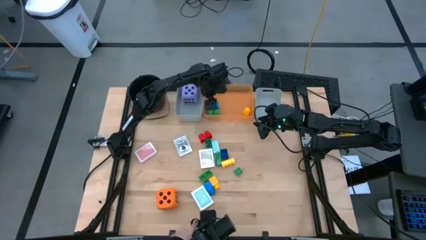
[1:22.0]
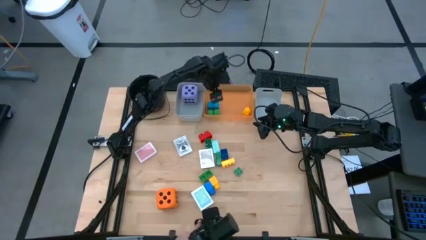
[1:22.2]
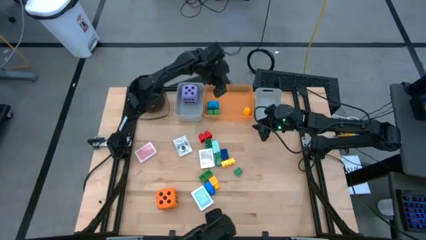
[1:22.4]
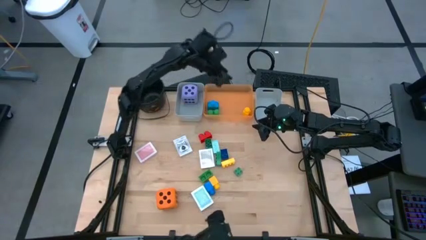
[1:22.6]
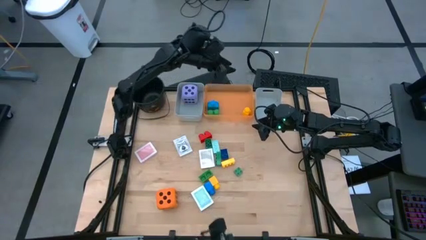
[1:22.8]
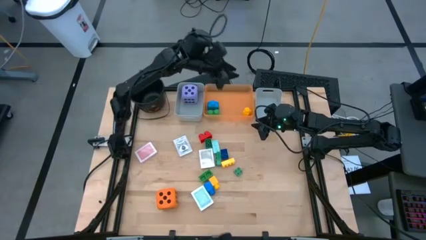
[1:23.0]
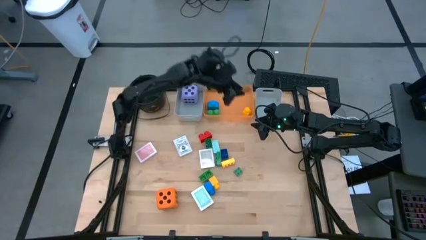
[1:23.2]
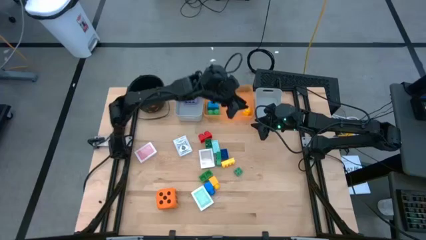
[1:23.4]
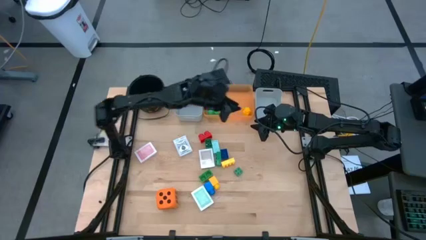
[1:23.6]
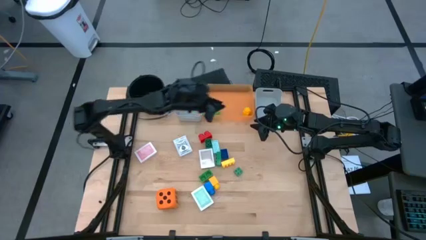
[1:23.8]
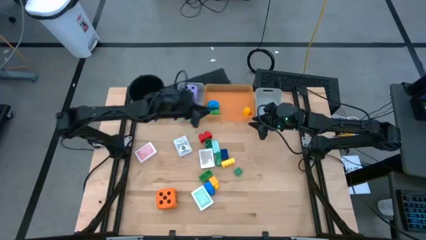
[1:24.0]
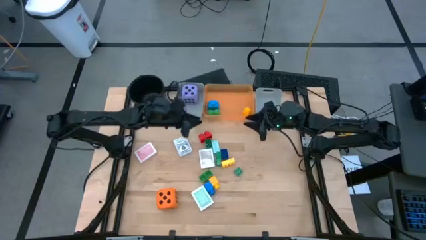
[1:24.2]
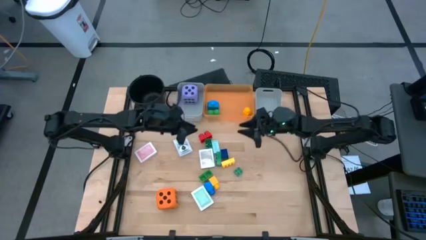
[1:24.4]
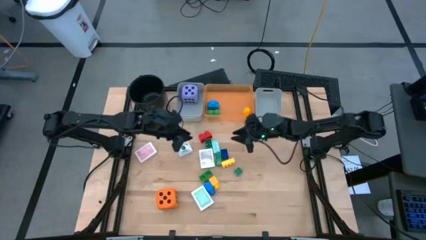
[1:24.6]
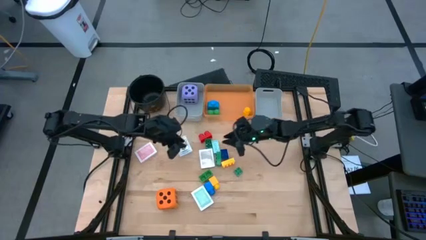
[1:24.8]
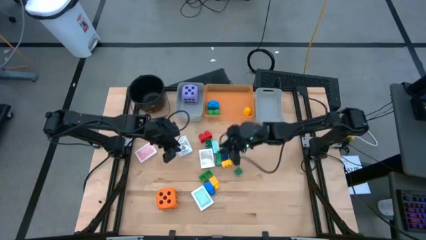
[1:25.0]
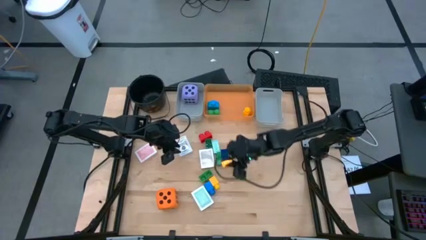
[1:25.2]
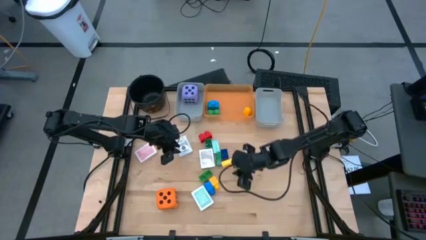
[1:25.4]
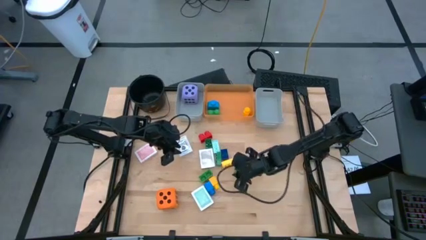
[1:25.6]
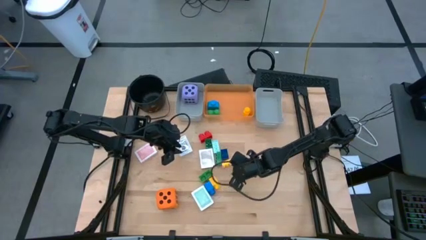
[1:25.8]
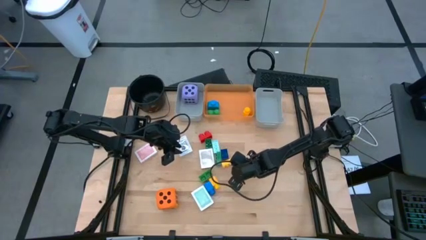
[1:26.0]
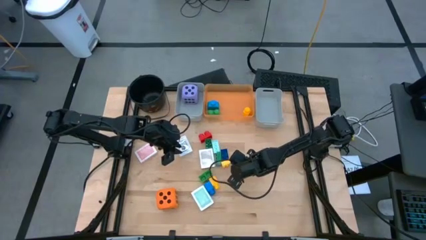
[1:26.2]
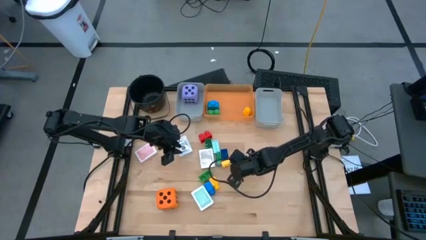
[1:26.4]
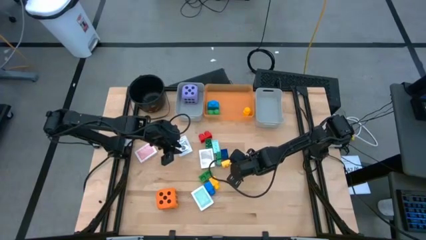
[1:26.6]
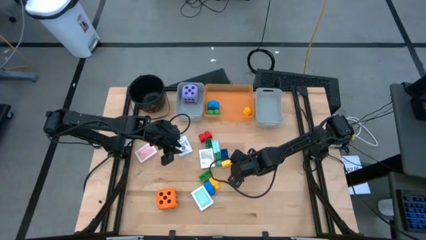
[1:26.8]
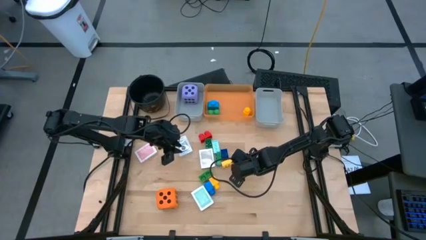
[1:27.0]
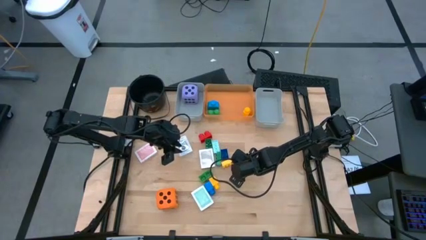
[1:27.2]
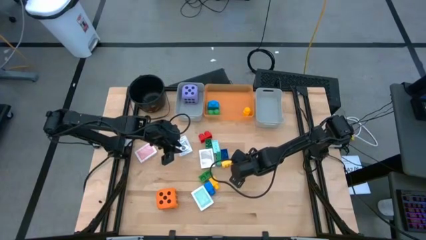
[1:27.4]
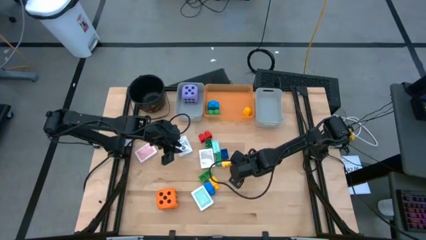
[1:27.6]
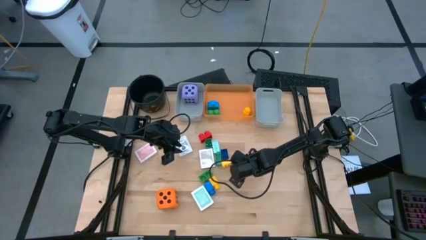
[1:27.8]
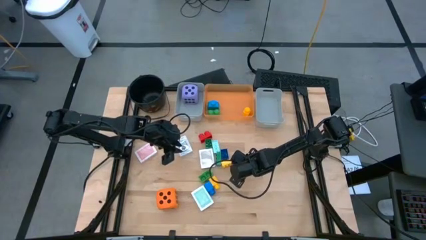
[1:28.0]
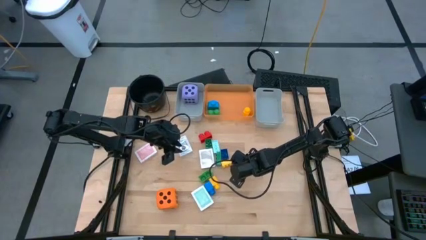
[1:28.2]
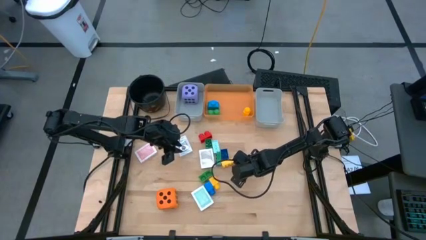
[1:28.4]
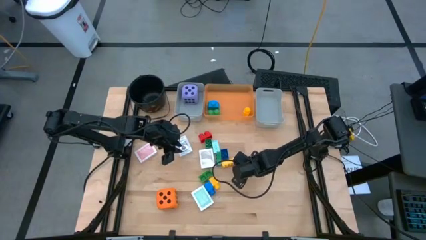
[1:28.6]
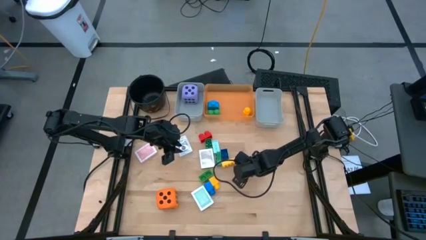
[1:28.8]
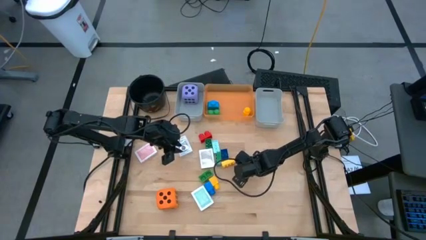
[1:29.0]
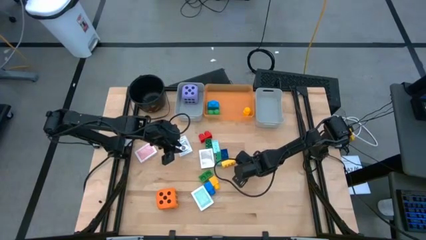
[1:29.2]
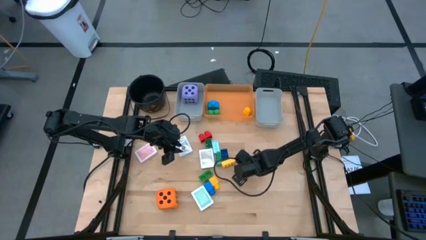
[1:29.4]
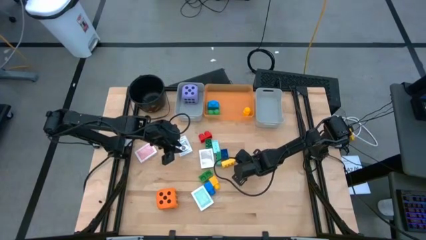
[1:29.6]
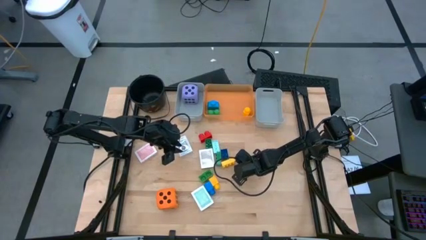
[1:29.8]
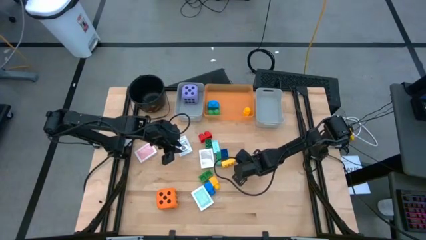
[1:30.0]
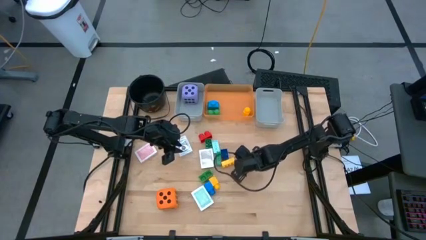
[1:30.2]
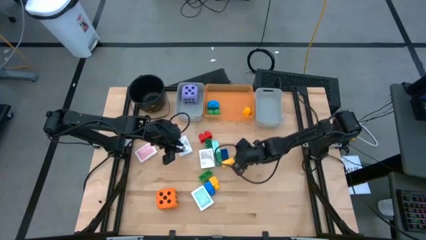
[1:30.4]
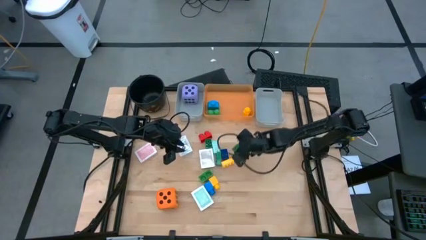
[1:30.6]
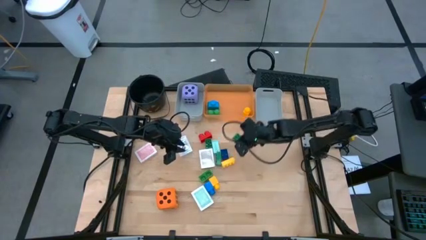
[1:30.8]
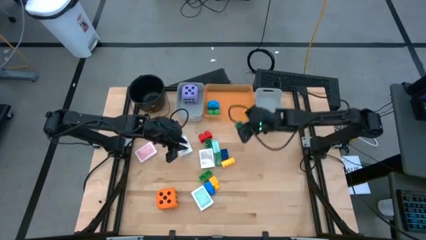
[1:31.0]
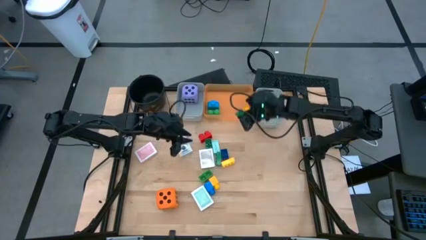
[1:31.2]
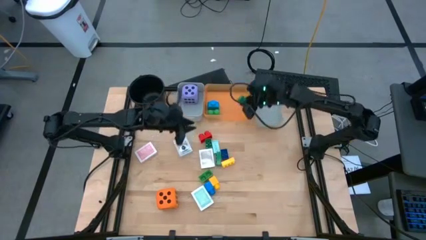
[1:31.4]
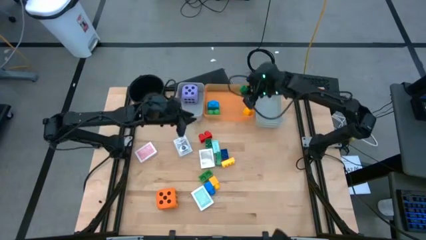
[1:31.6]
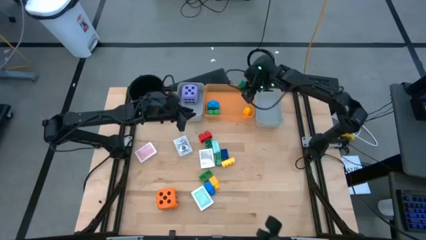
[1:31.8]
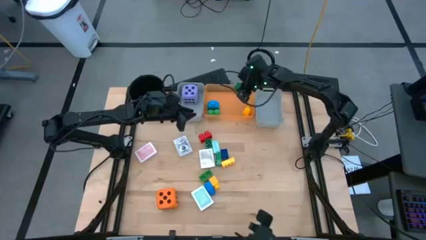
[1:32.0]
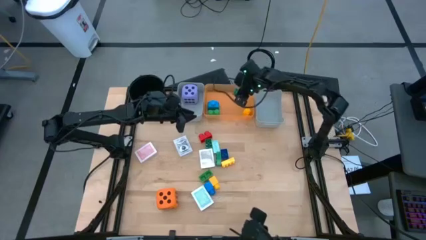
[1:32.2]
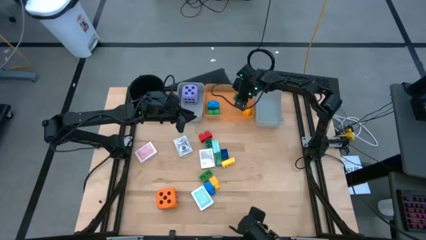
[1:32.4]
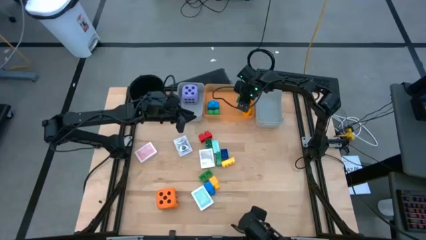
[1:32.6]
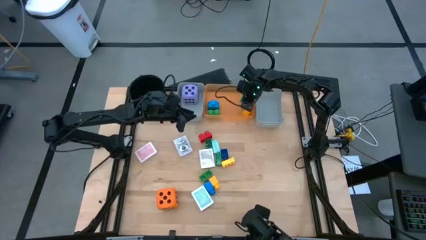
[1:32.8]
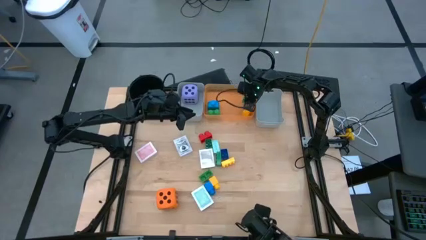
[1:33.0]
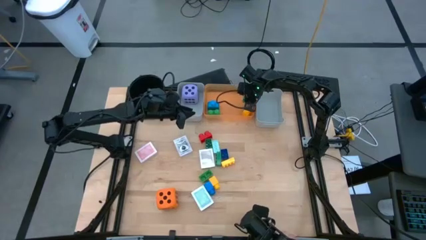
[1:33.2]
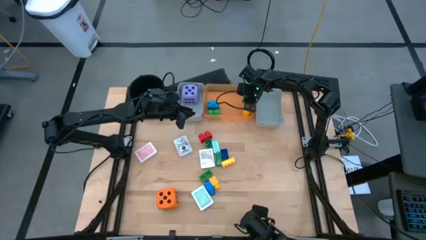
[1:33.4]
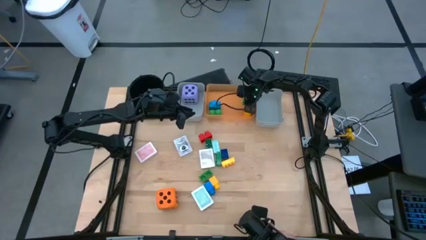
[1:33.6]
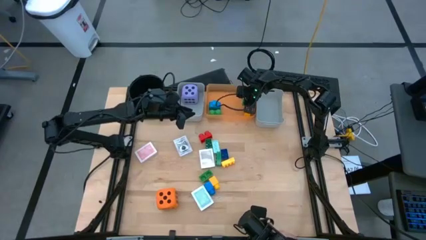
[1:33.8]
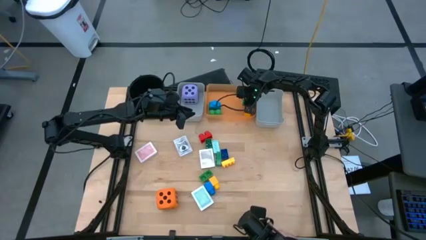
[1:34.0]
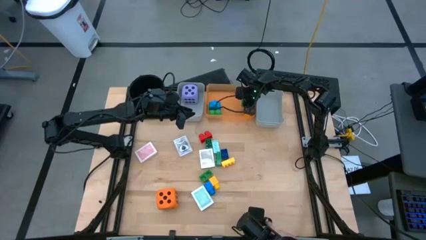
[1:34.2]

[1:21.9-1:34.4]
Task: Pick & Place Toys
Put the bottom dark green game piece into the orange bin

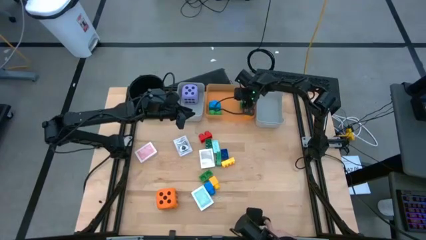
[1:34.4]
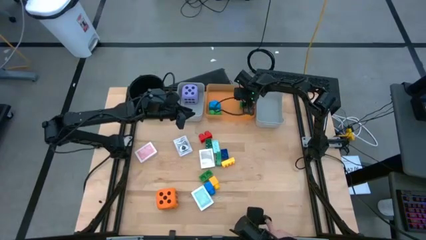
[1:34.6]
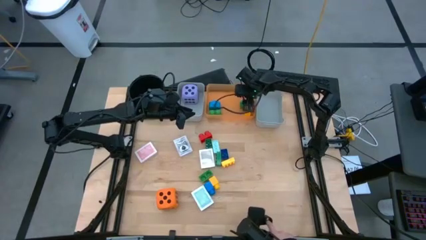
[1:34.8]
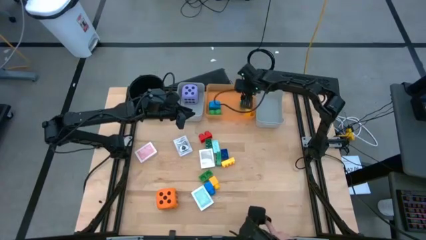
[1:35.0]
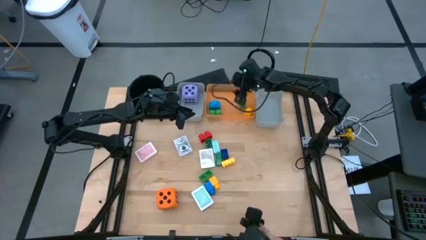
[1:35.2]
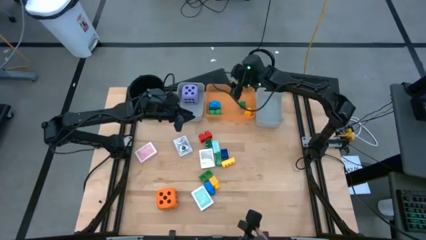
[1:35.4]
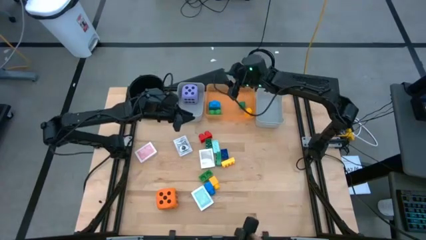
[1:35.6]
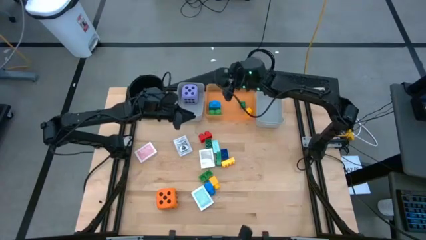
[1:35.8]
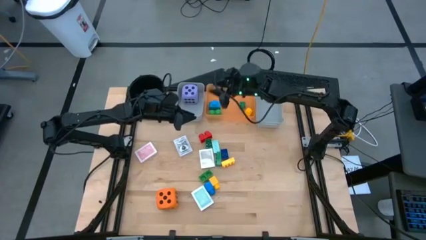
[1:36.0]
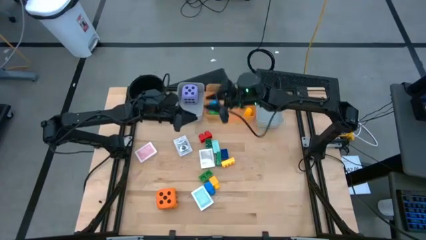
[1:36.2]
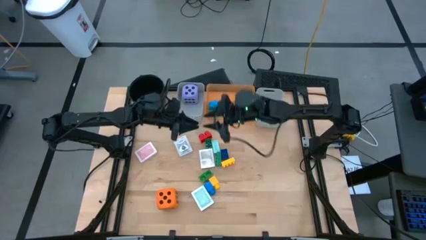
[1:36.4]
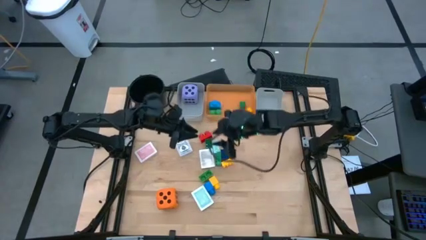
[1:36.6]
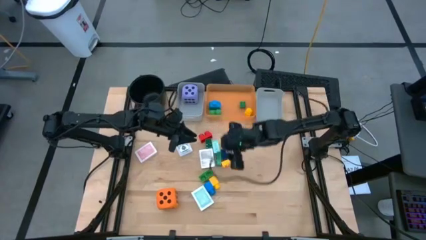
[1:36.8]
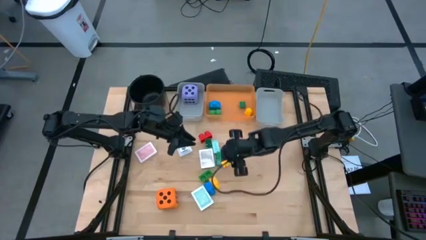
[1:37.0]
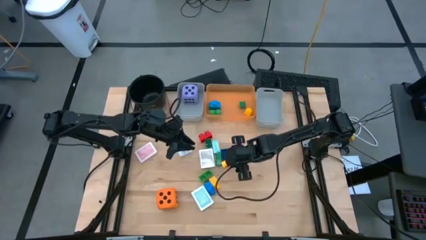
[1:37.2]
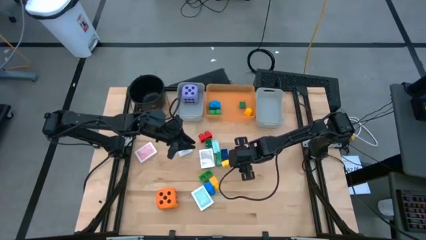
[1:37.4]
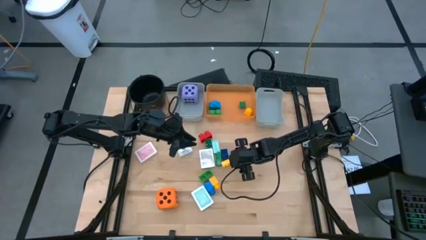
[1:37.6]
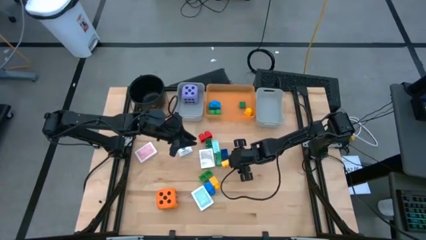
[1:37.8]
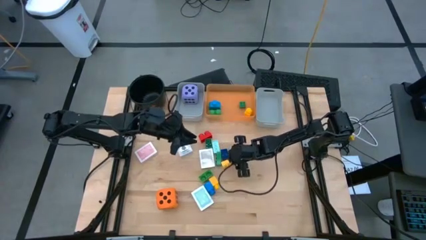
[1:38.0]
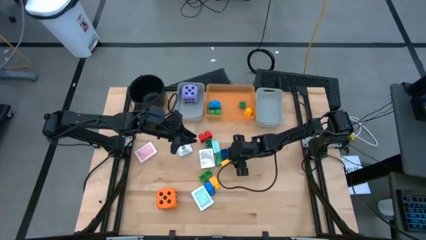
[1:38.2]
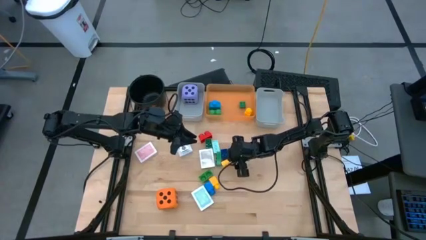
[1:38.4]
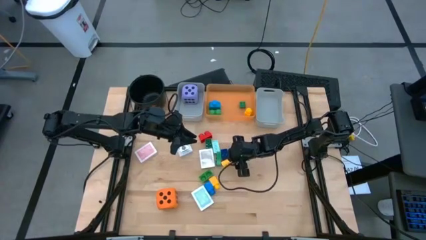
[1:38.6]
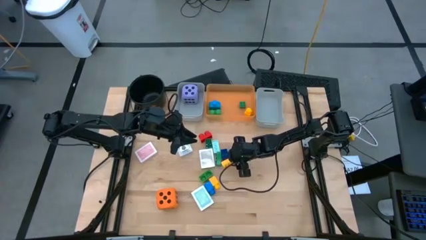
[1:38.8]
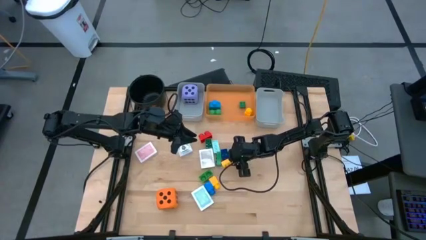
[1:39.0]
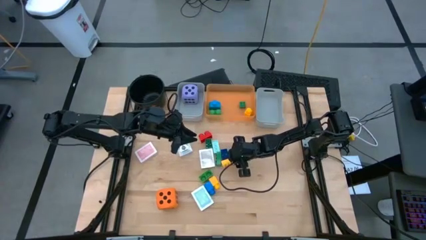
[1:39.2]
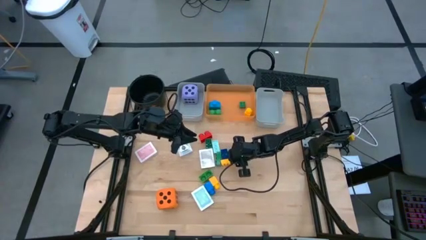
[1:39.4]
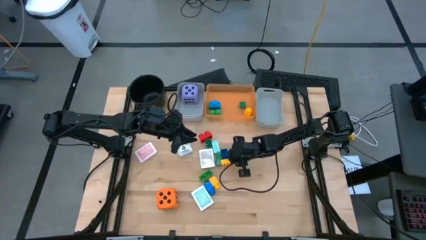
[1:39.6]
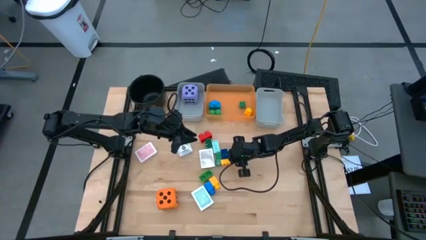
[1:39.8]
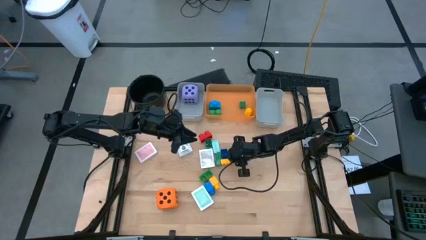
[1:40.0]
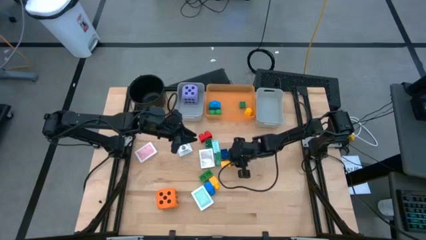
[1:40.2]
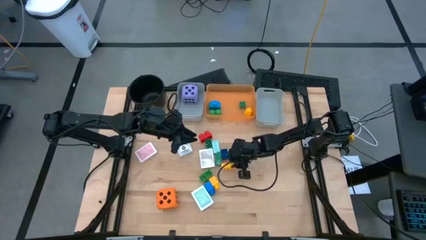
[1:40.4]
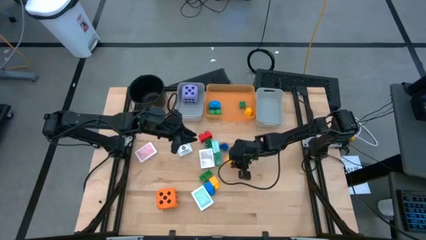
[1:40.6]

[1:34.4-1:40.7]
Put the top yellow game piece into the orange bin
